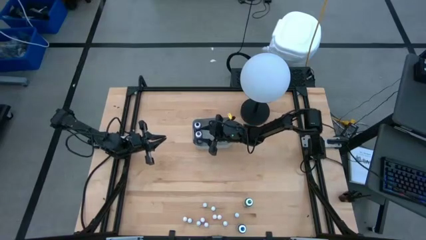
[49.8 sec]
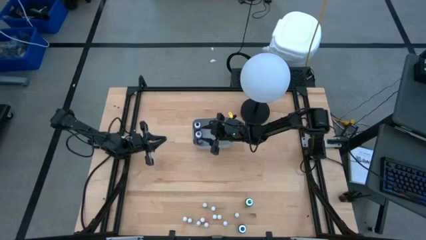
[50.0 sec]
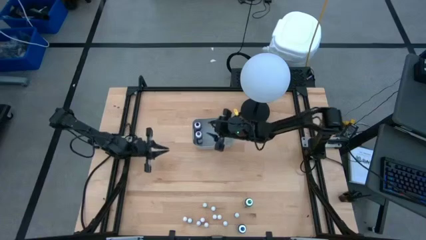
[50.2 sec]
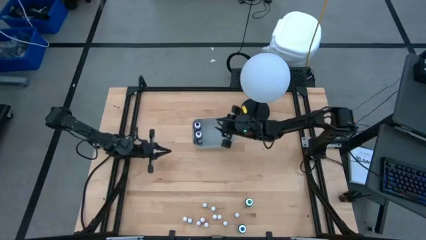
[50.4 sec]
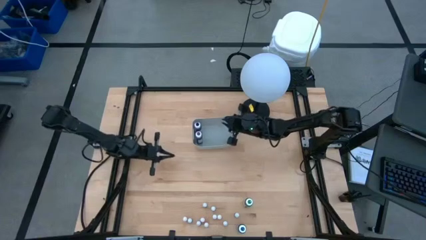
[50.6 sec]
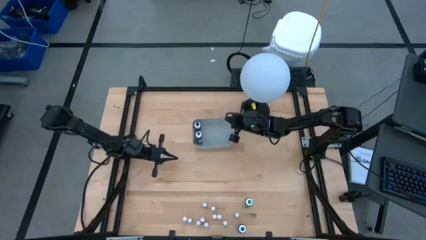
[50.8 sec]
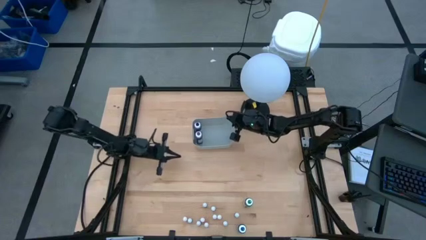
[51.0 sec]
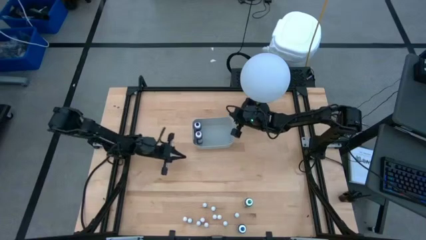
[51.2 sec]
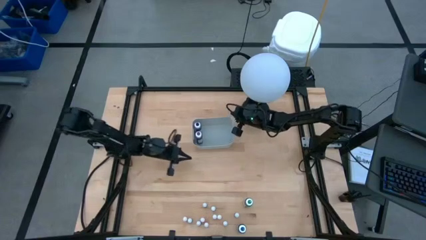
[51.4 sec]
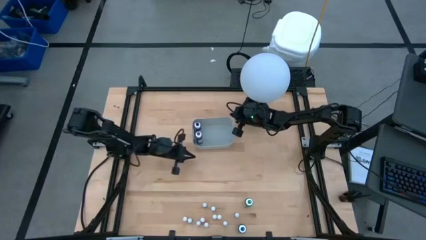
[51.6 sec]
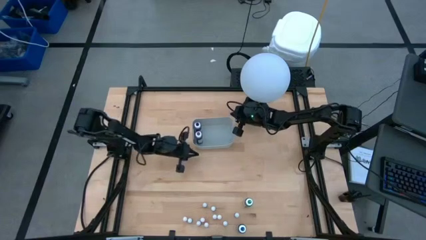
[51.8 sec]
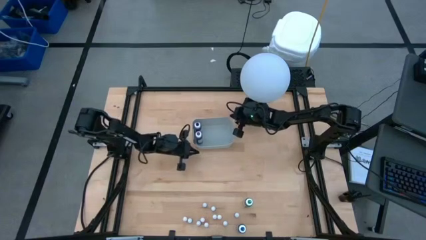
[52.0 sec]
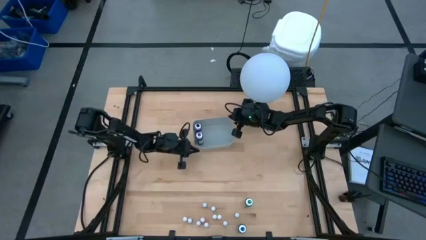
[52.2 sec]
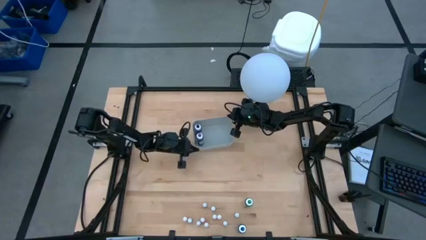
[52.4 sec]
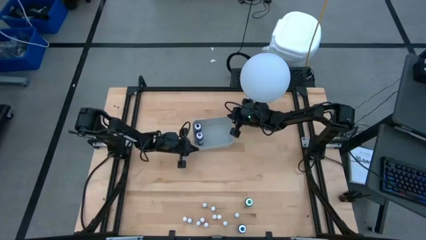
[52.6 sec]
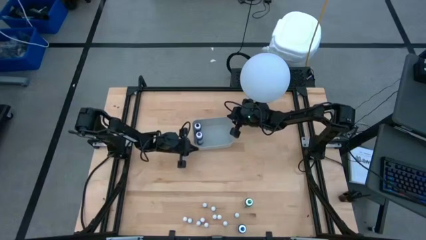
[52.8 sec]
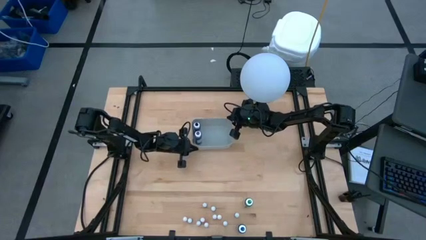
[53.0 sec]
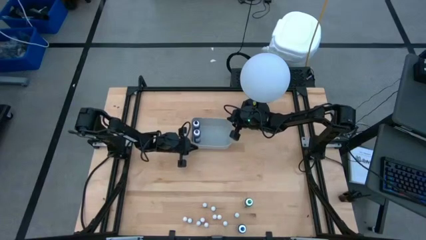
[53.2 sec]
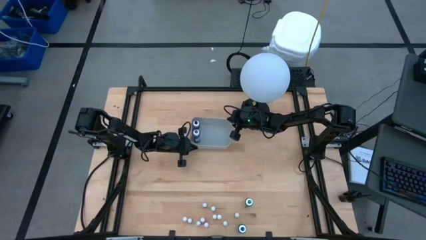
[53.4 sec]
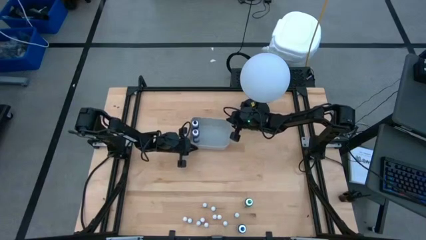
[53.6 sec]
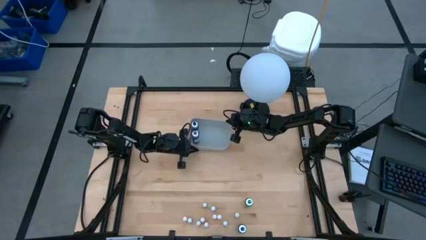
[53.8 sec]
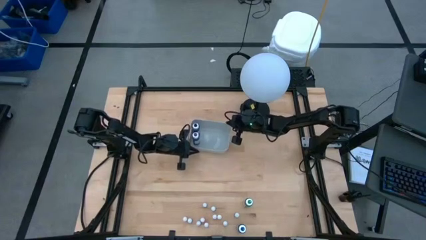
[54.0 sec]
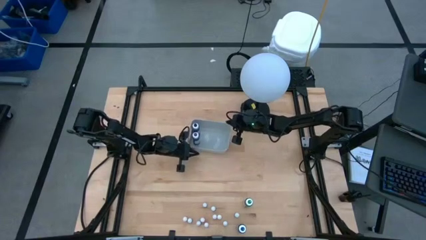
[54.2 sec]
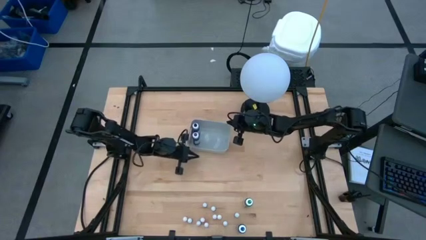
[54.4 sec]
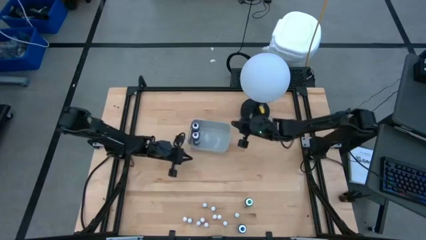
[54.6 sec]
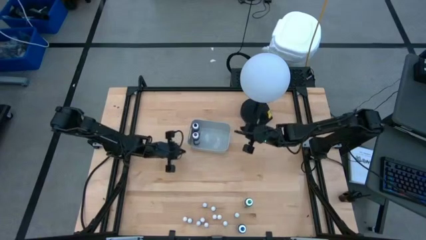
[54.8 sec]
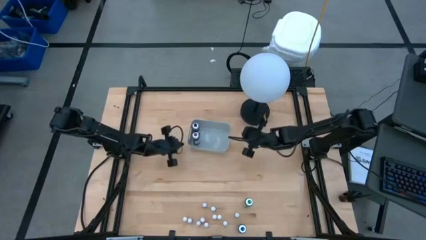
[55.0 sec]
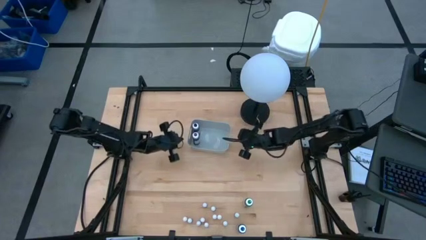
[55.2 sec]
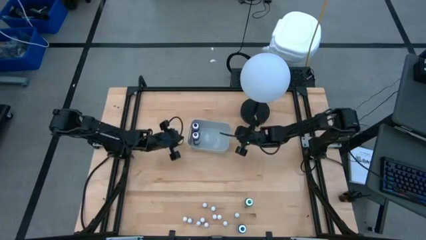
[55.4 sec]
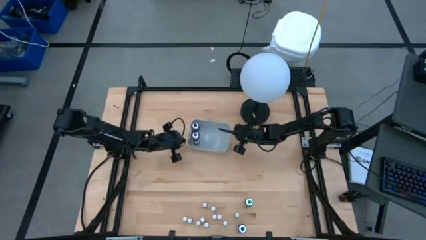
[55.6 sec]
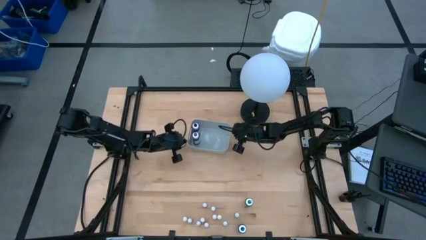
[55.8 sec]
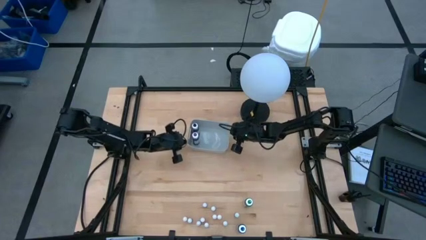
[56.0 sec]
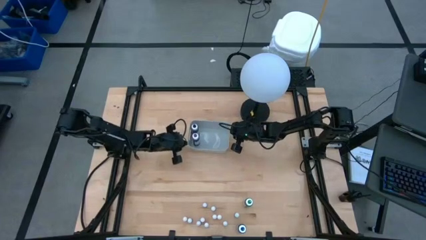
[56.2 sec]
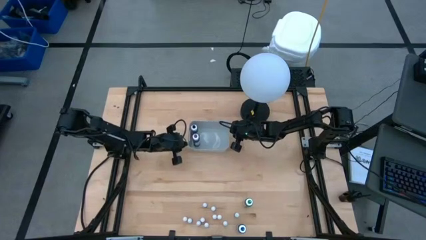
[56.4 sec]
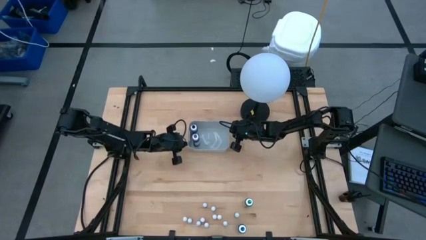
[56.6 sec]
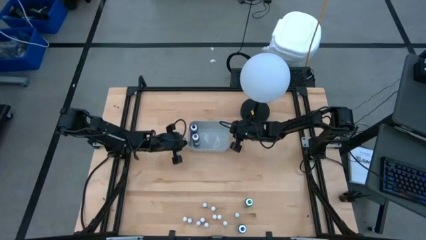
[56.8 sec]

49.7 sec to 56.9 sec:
Task: Pick & Place food coloring
Adjust the gray bin

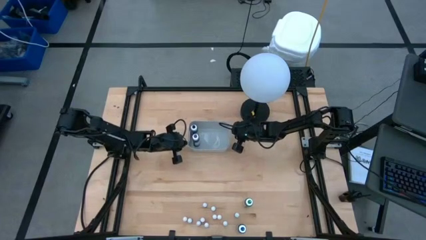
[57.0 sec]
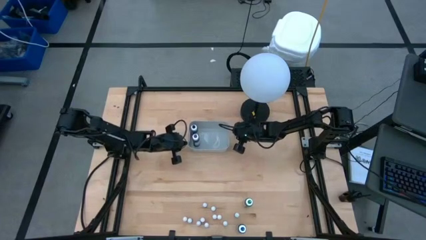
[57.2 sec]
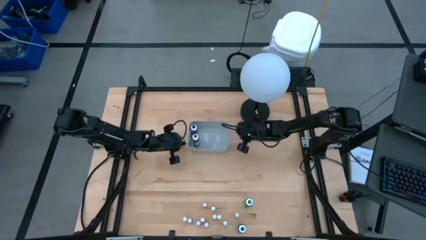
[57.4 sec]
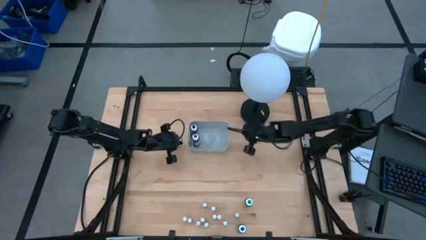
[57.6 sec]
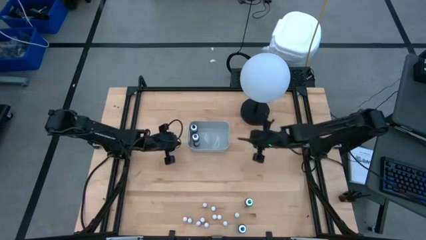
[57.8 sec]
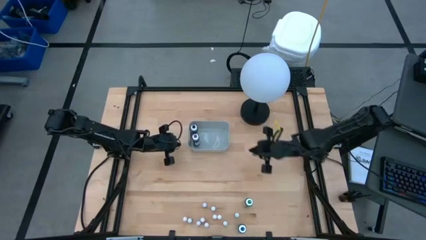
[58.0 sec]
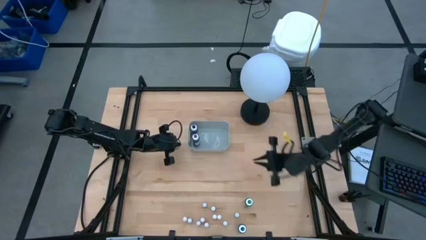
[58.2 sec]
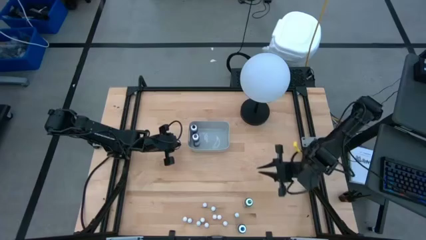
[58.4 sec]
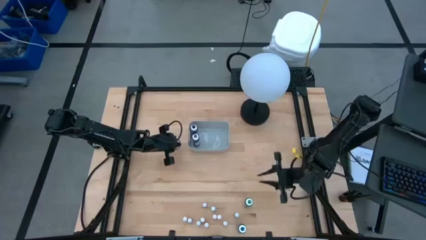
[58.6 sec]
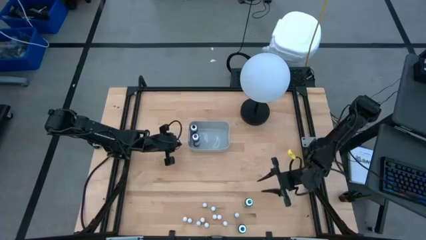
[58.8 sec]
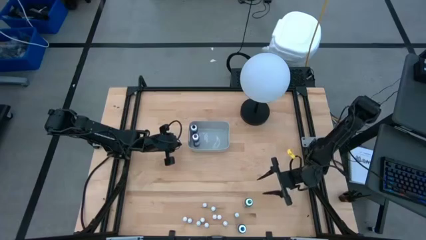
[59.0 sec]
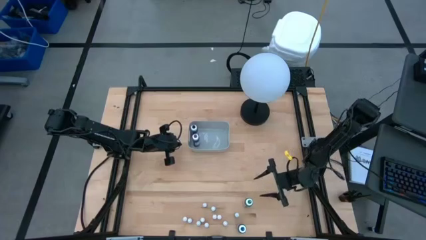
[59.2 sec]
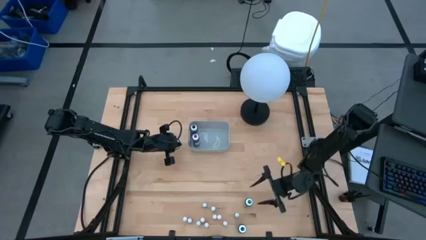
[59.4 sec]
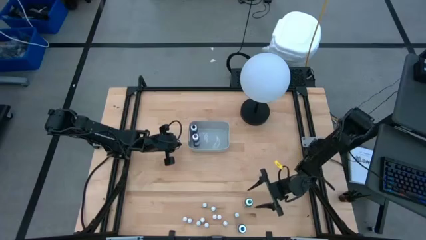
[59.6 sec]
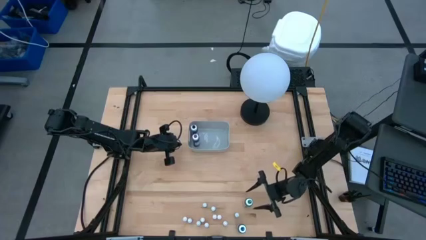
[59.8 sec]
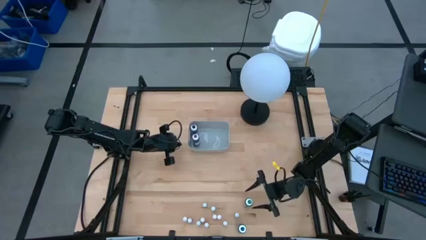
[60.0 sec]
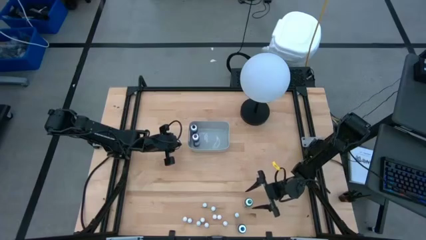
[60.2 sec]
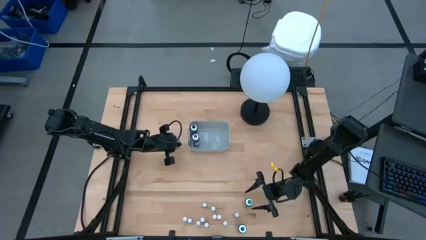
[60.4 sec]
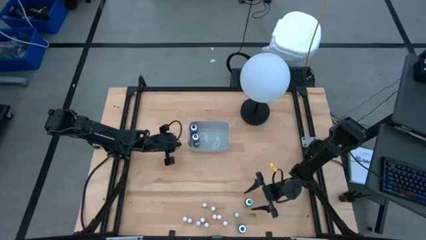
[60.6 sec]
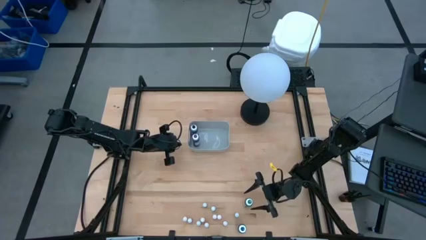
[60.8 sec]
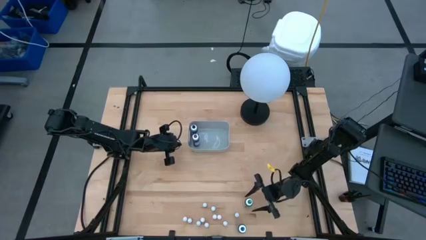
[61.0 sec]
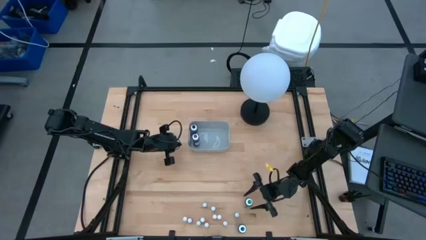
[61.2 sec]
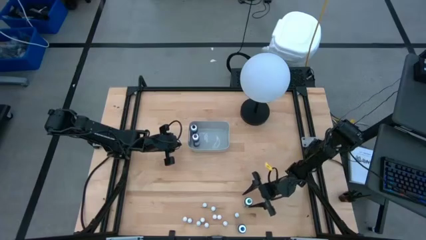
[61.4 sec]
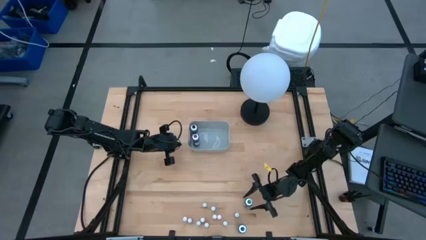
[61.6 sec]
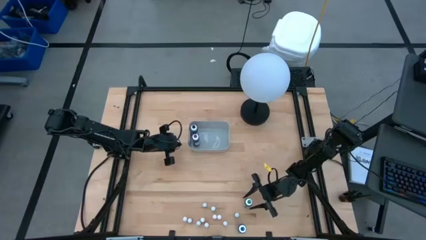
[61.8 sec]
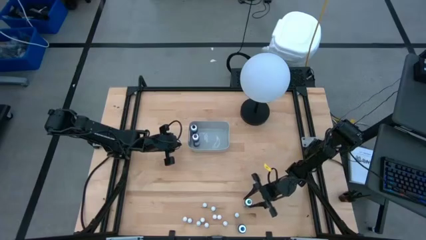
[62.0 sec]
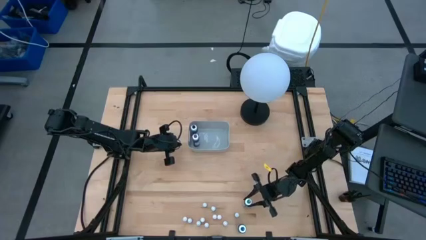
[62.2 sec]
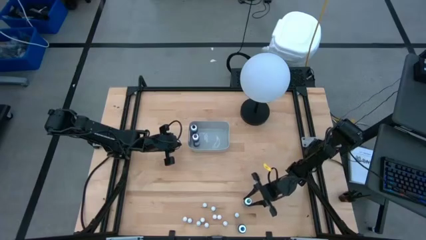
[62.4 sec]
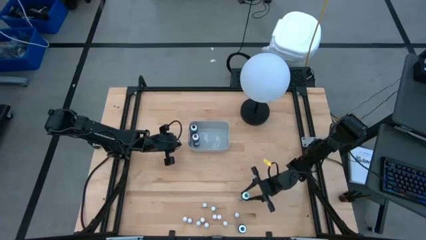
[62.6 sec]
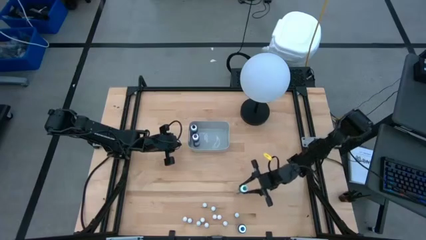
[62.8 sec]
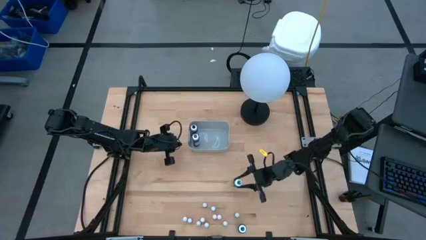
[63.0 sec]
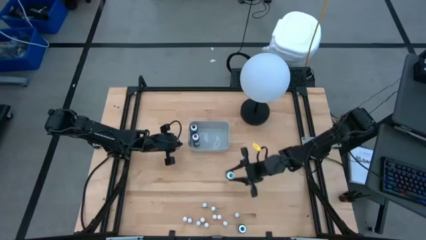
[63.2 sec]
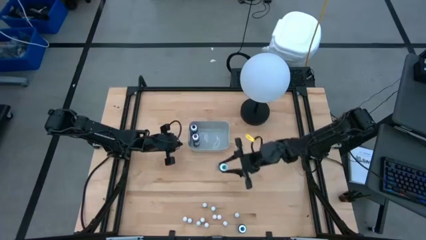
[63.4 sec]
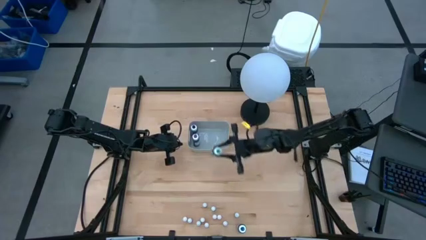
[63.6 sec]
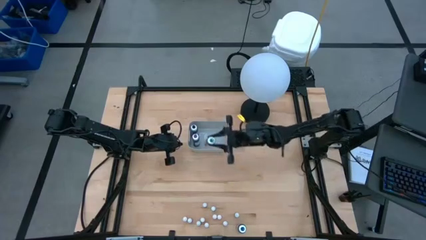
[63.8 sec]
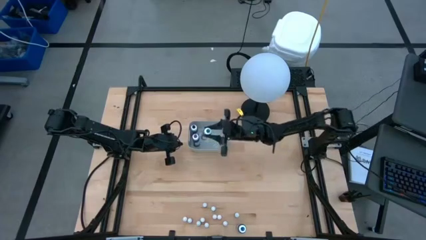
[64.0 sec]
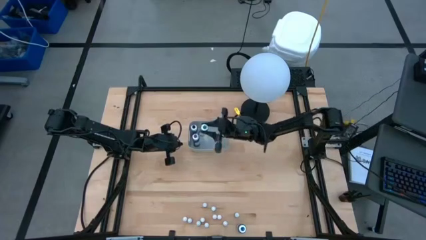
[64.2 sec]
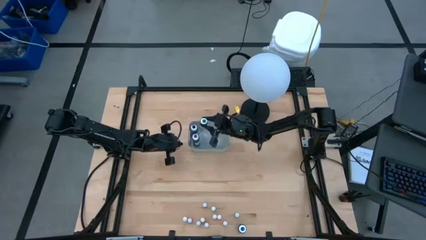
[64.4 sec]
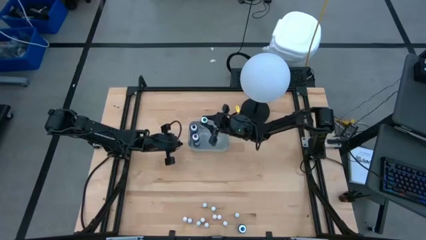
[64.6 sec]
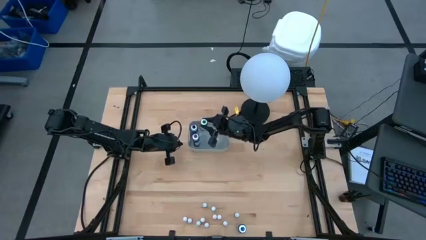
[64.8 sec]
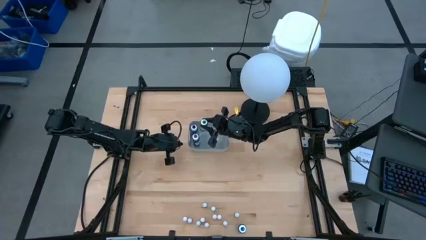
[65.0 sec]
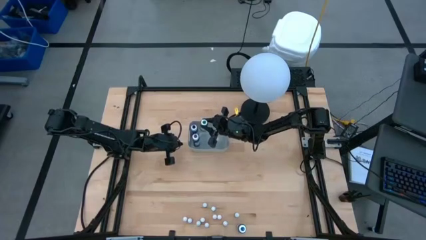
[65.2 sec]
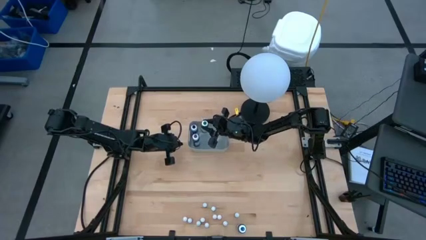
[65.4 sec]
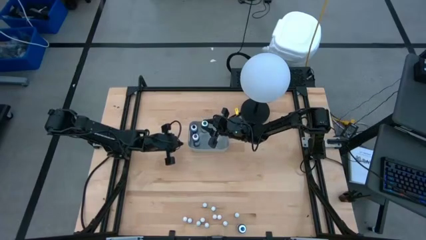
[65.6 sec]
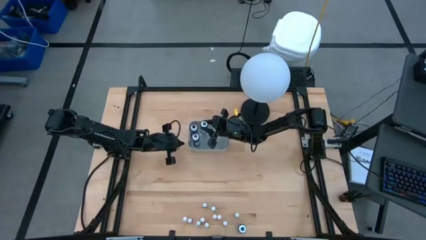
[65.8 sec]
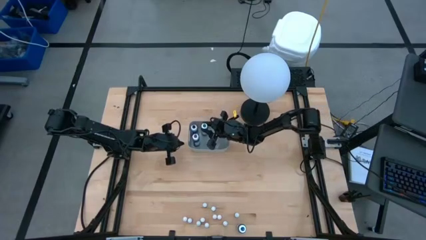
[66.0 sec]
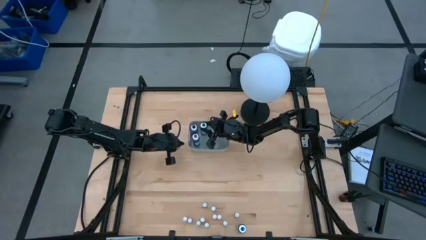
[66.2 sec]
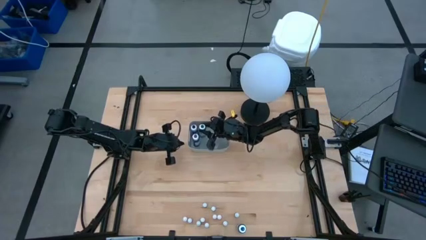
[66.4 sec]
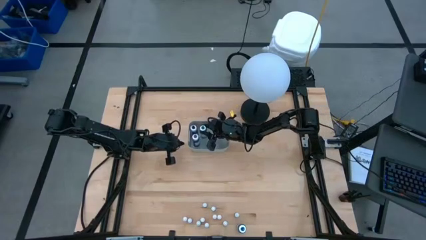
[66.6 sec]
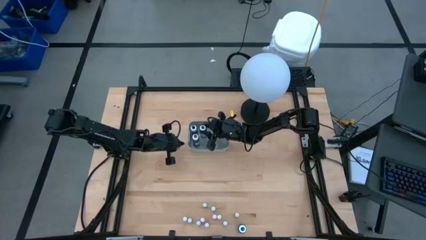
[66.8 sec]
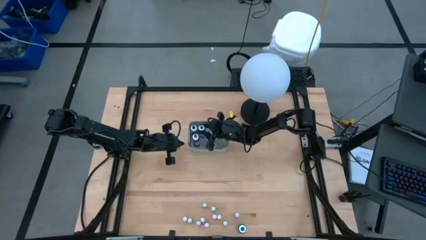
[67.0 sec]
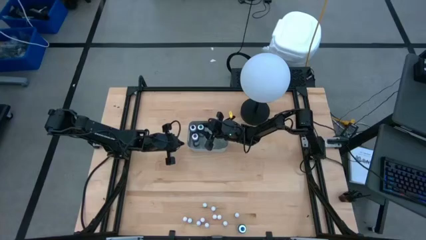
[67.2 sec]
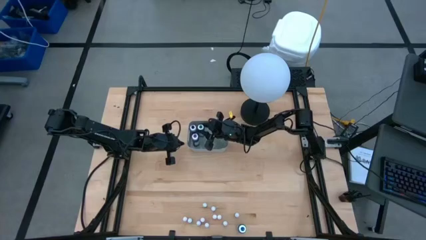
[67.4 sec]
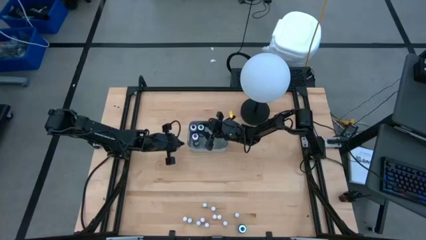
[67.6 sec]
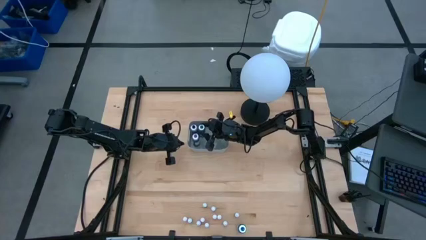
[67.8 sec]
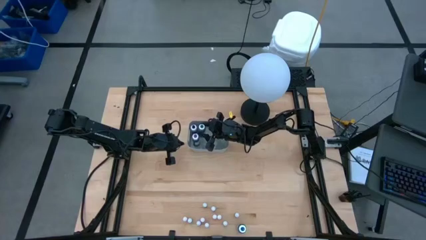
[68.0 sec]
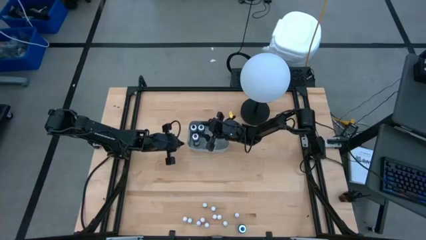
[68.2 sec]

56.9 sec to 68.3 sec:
Put the large green food coloring bottle into the gray bin
